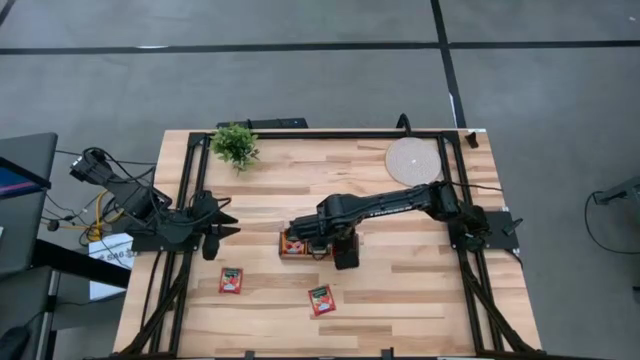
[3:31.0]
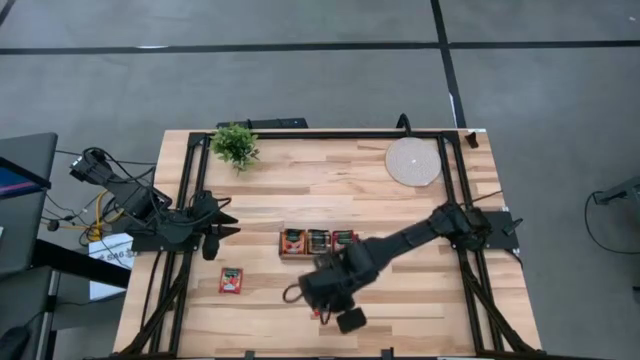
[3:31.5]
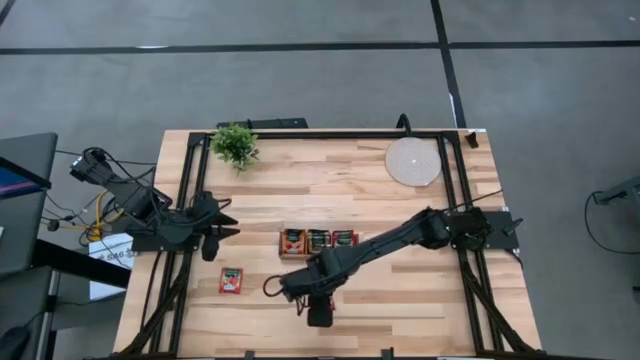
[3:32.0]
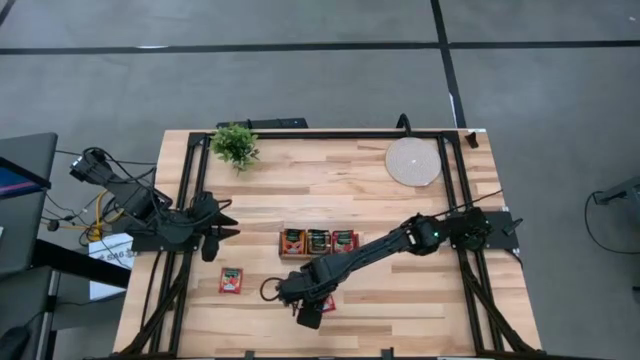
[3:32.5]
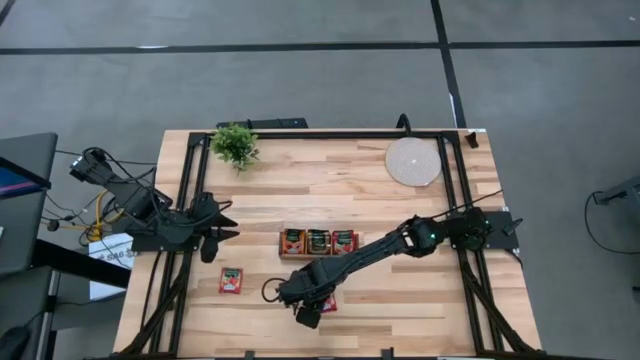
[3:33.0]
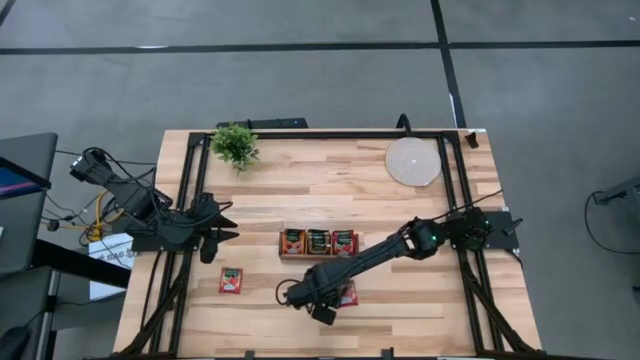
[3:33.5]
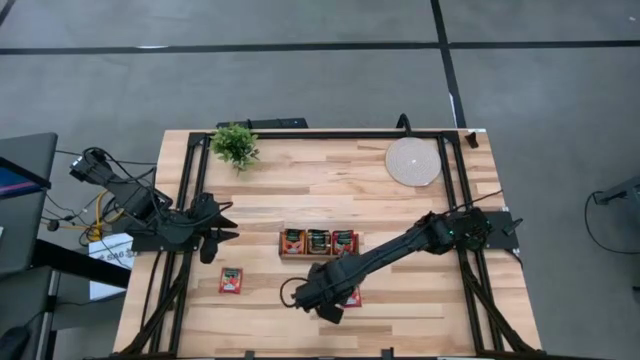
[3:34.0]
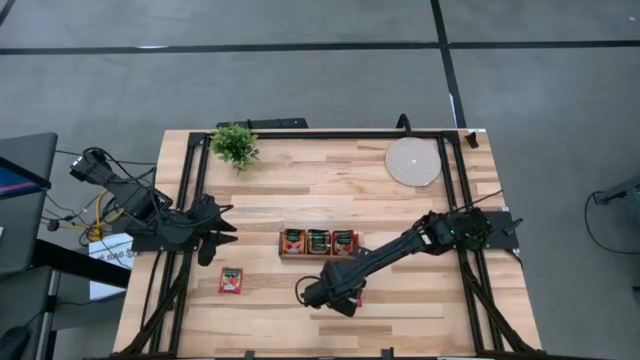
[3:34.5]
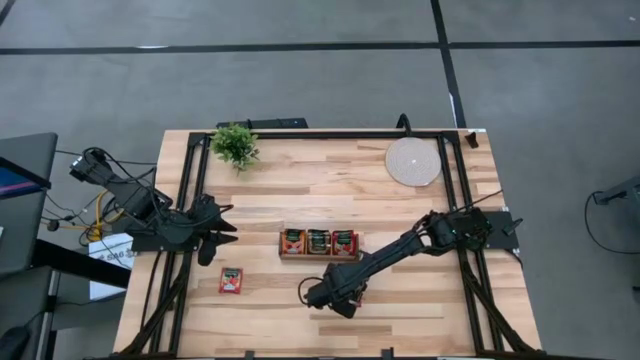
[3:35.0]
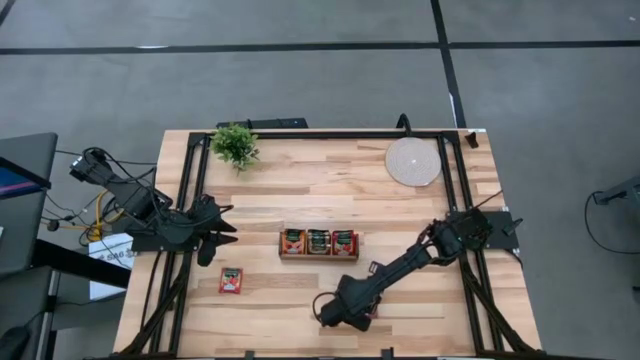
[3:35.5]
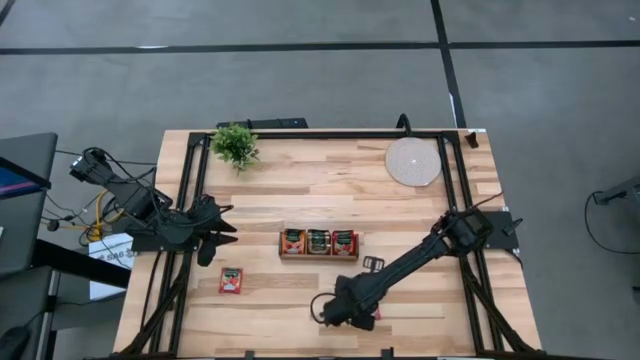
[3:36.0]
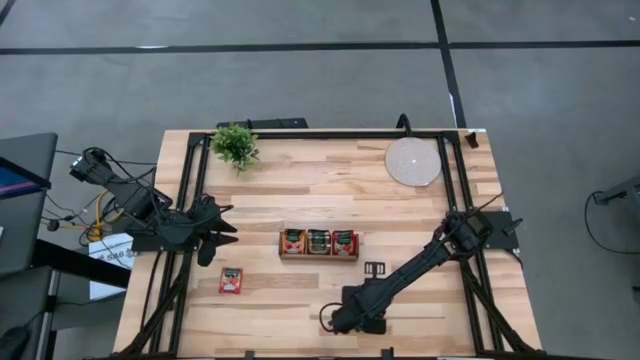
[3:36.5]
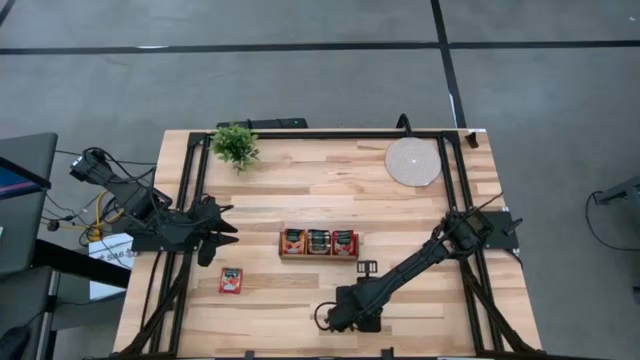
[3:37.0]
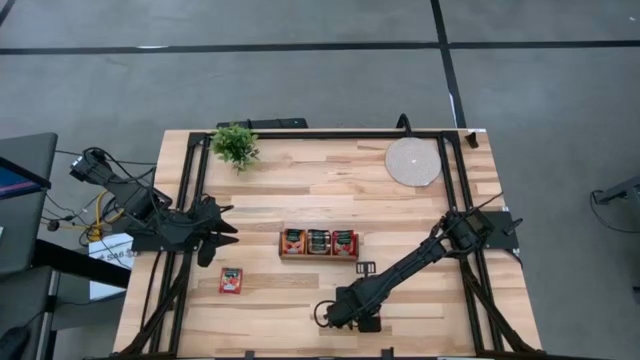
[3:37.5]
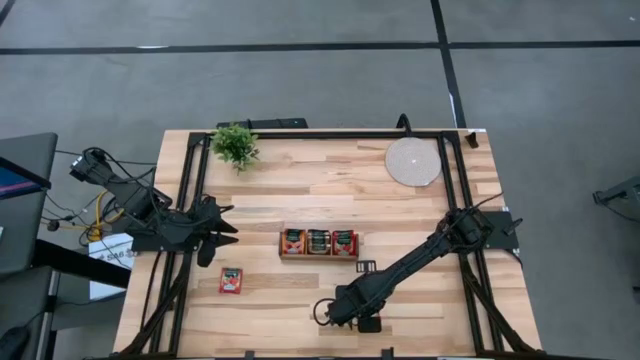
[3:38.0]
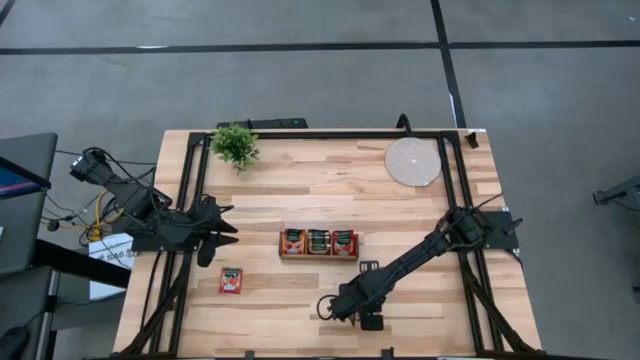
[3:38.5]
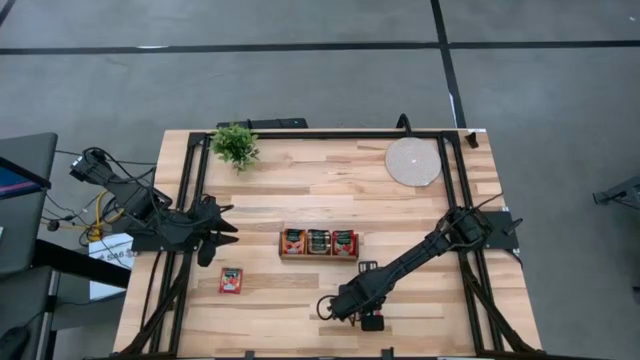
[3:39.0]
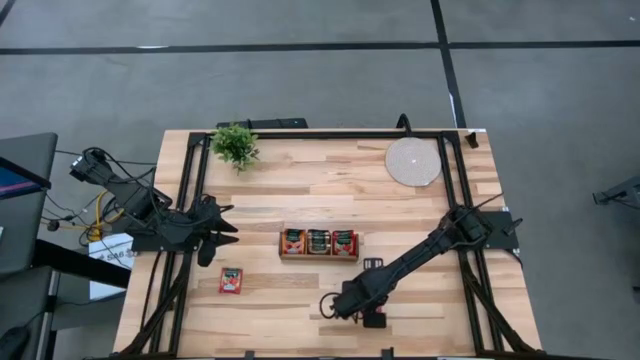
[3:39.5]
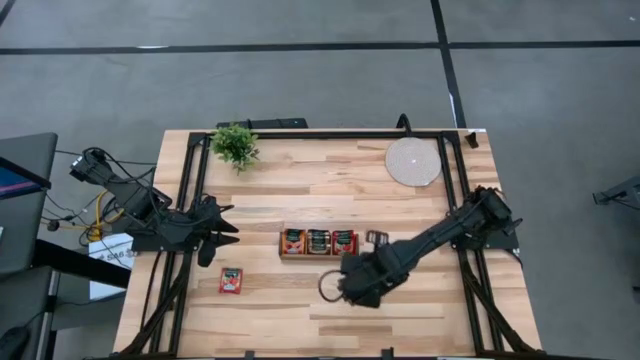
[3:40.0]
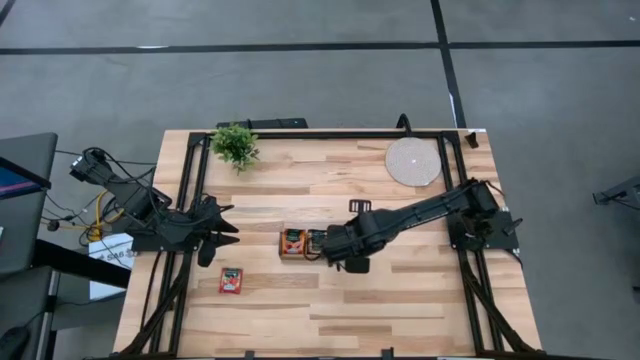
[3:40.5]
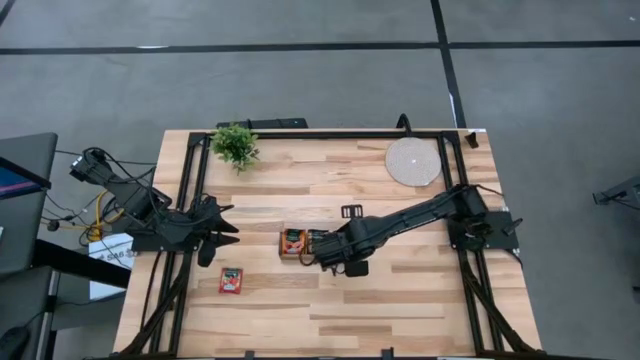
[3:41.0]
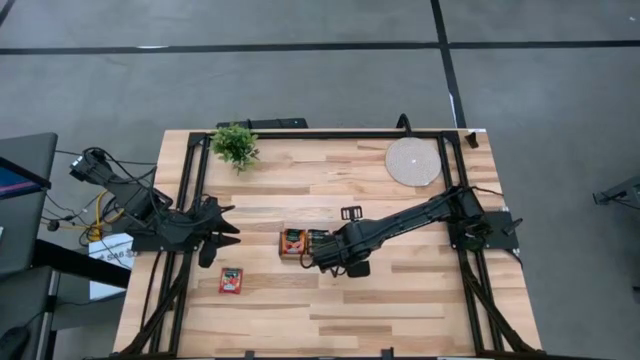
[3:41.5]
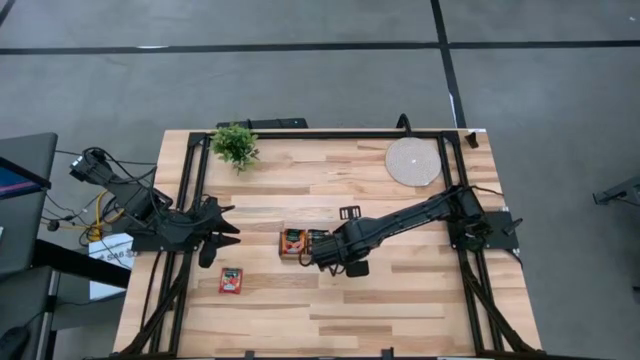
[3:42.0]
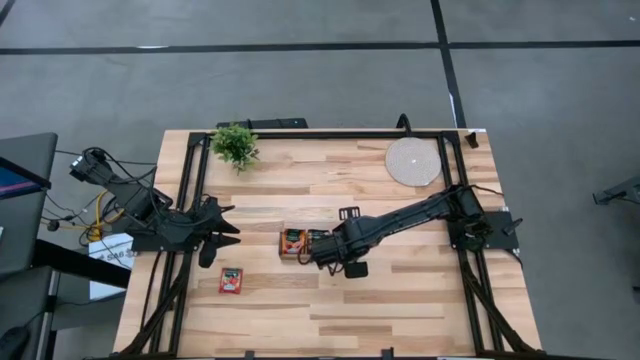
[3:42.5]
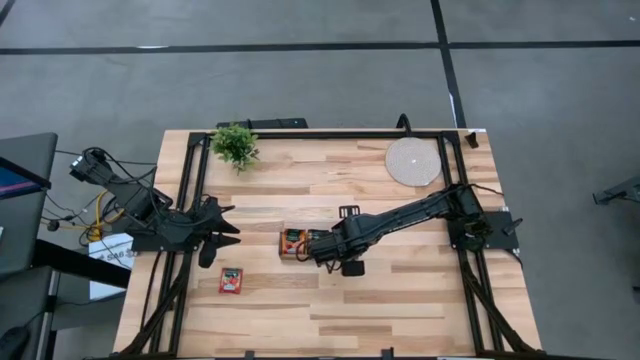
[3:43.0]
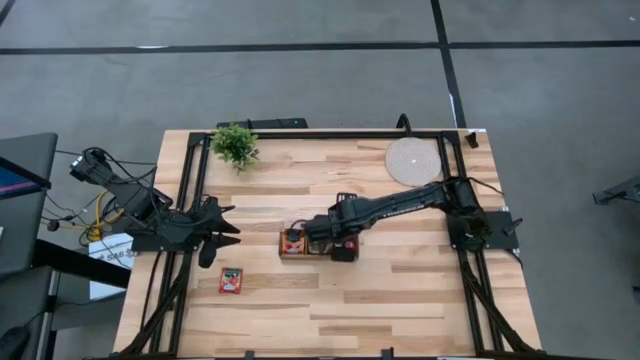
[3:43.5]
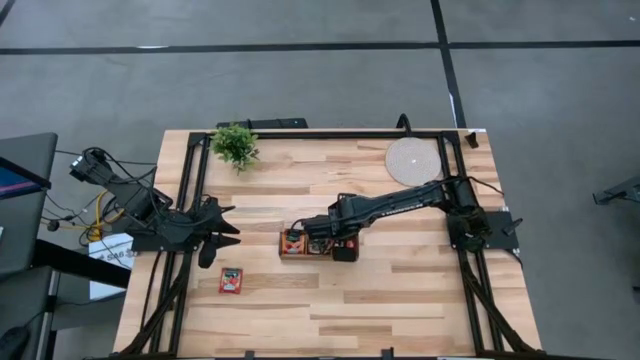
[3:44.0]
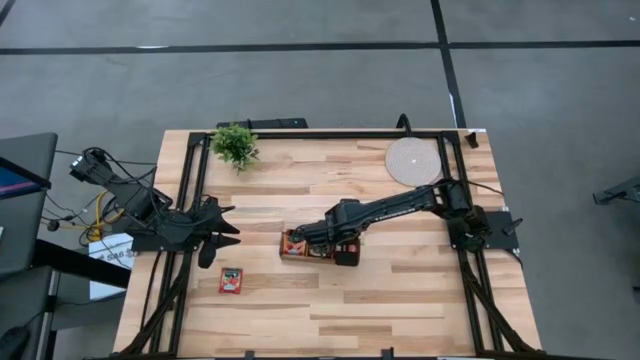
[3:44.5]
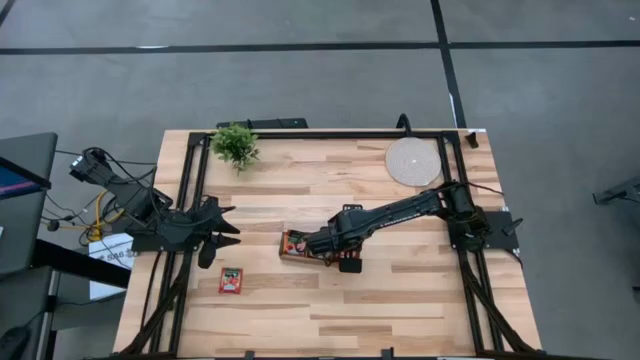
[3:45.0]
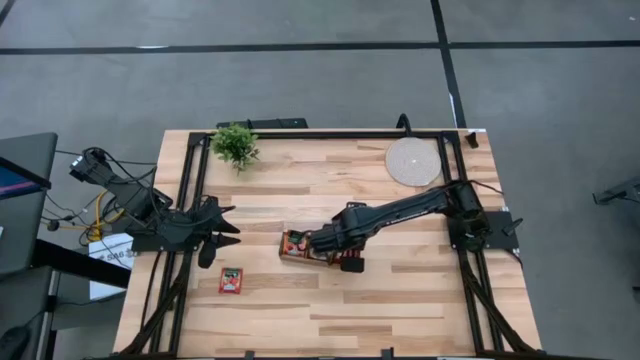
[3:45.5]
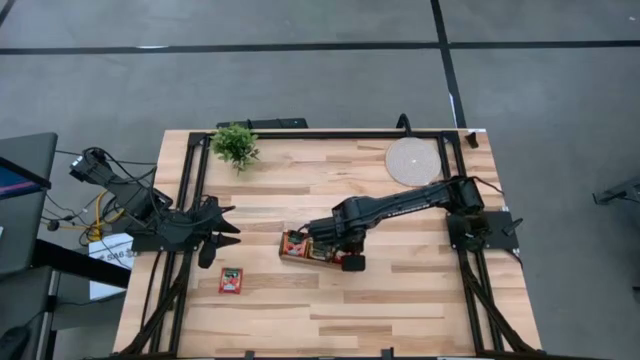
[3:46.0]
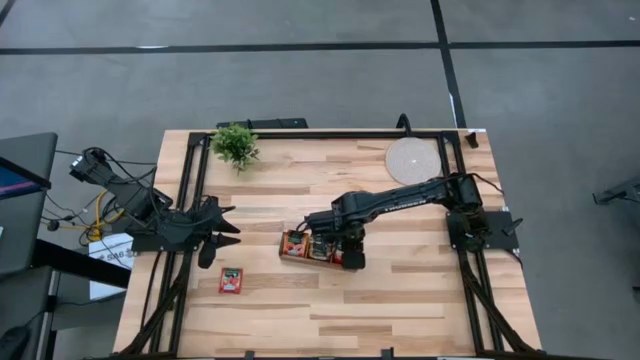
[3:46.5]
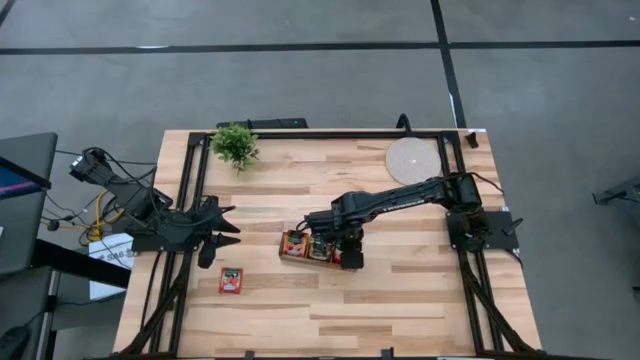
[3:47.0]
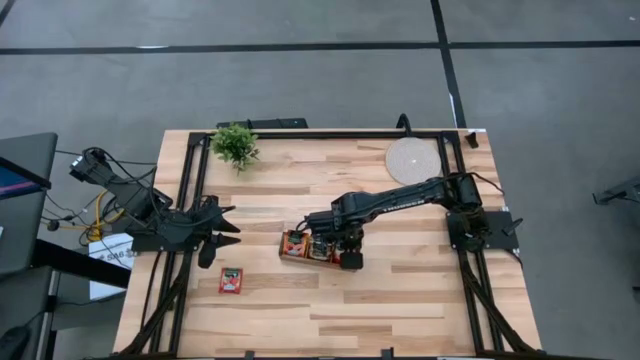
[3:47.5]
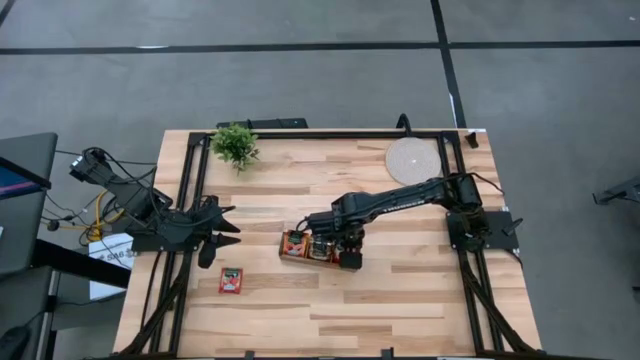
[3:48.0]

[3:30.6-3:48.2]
Task: Pick & Place Tea
Put the red tea bag into the right section of the wooden organizer

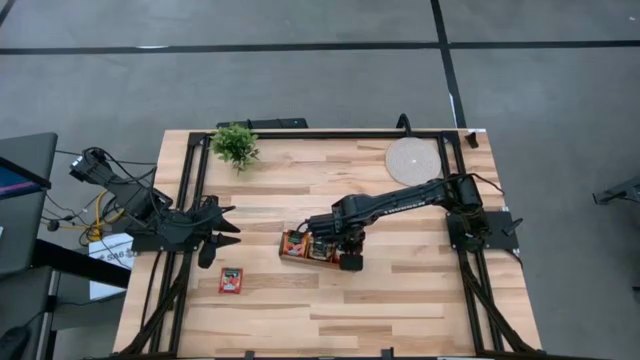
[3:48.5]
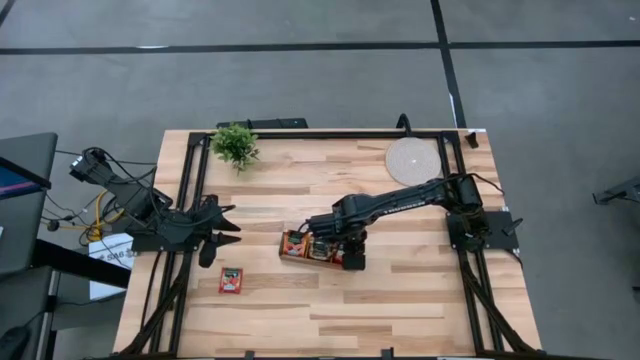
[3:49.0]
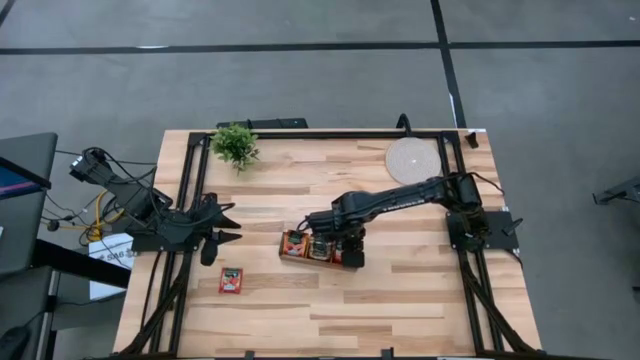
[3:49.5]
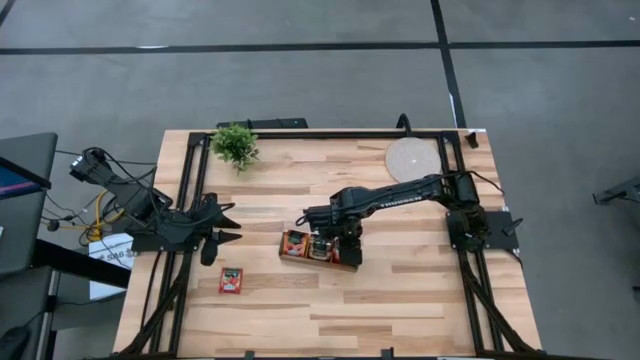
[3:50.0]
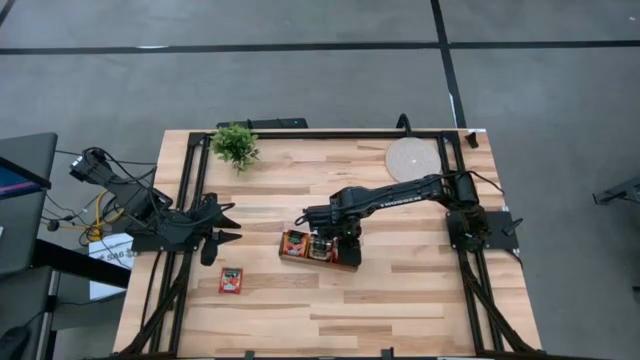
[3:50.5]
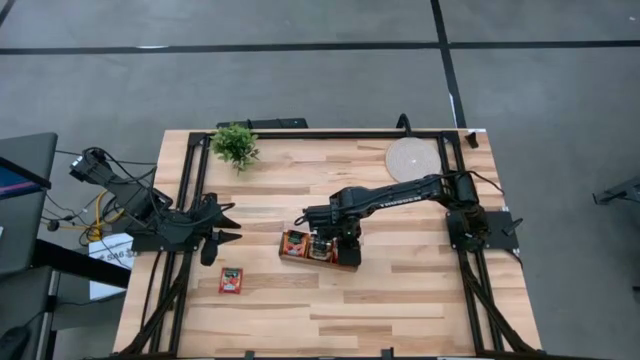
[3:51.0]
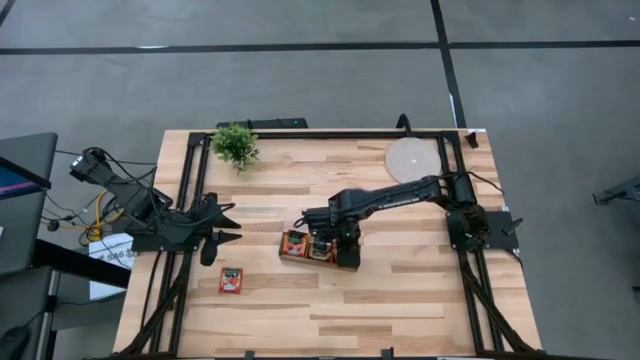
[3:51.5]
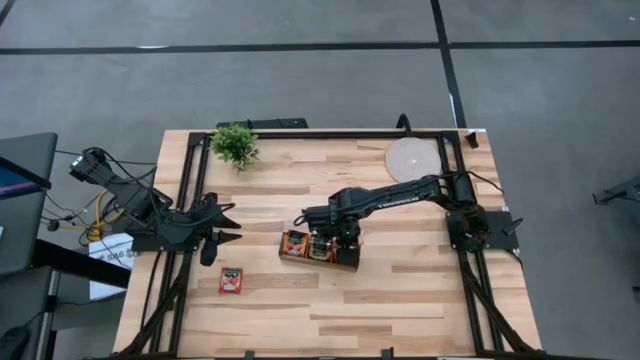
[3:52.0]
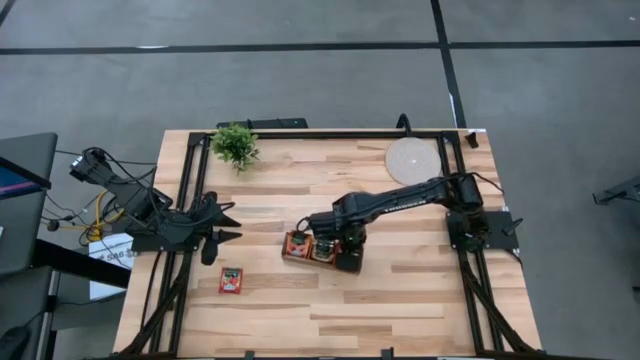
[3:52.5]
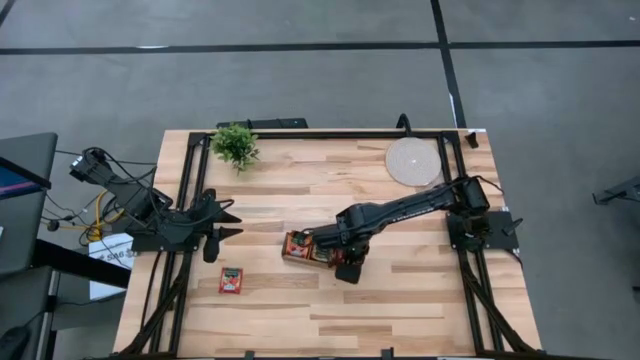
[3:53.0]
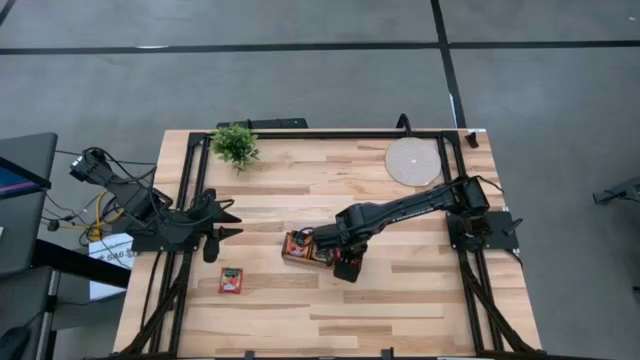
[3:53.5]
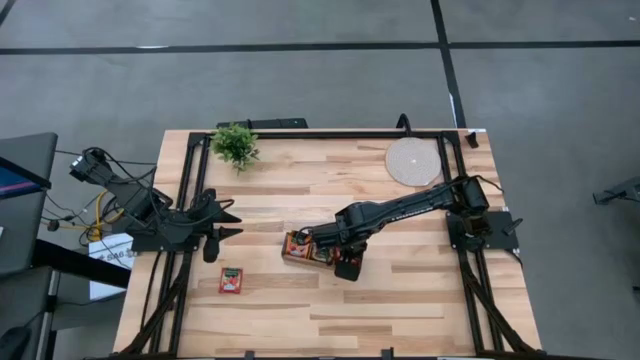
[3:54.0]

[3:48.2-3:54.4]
Put the red tea bag into the right section of the wooden organizer
